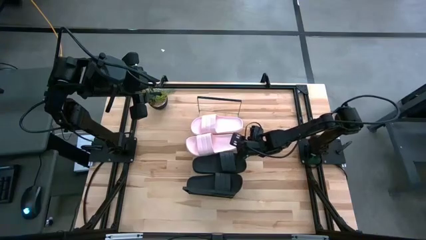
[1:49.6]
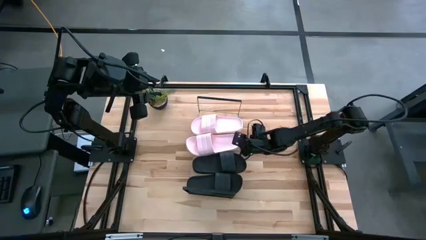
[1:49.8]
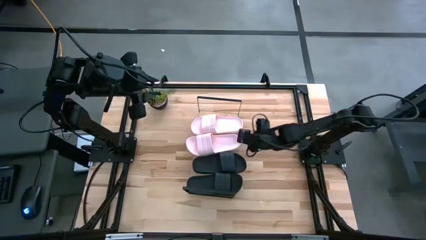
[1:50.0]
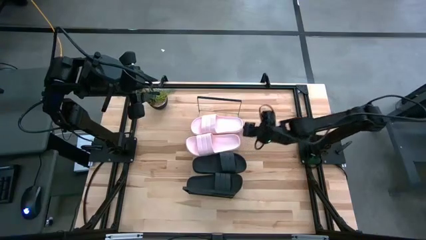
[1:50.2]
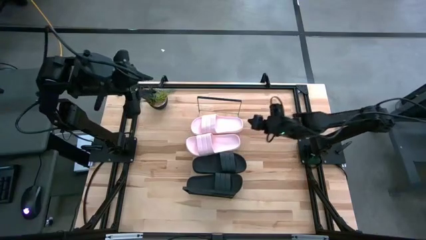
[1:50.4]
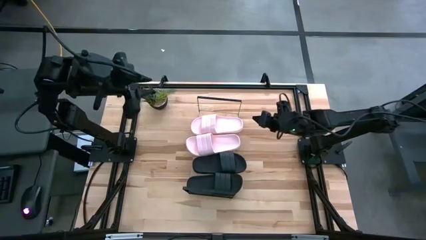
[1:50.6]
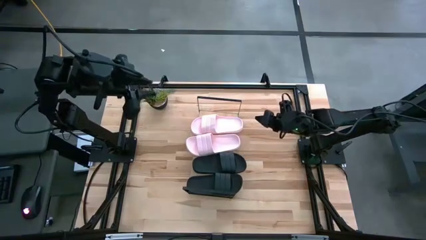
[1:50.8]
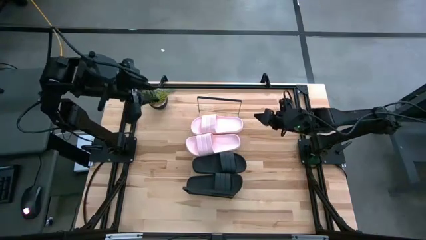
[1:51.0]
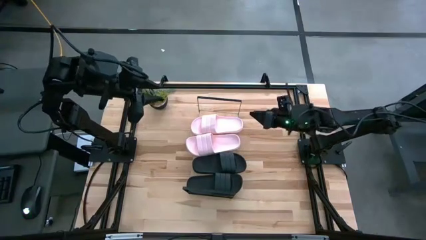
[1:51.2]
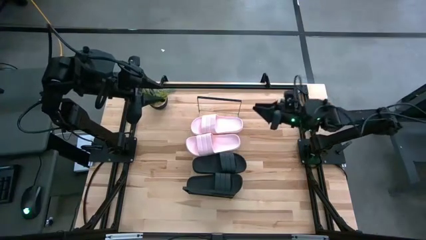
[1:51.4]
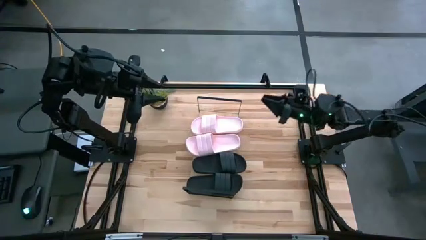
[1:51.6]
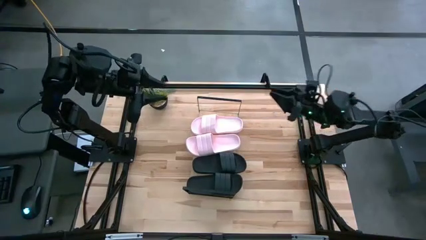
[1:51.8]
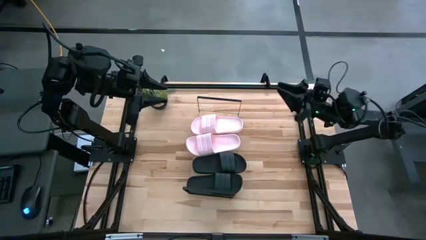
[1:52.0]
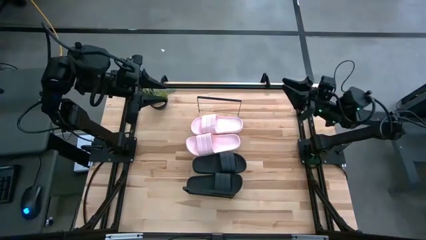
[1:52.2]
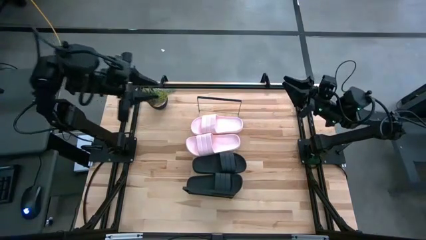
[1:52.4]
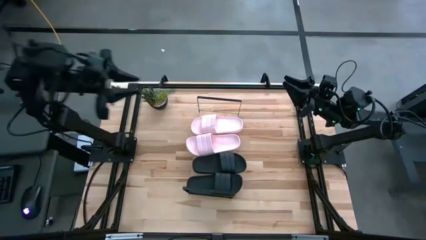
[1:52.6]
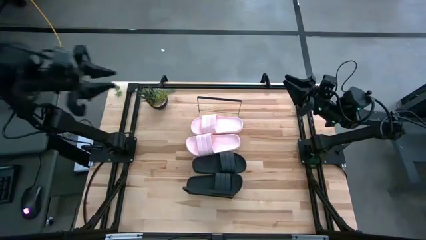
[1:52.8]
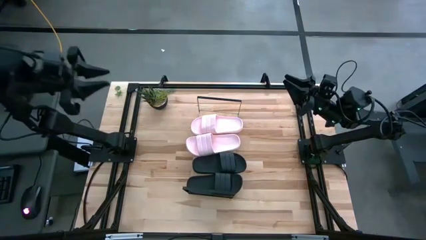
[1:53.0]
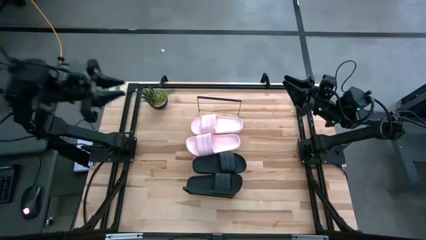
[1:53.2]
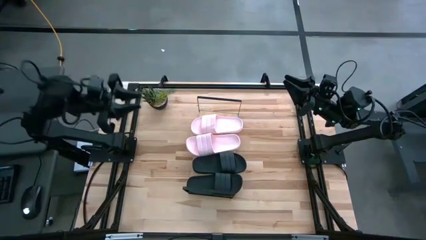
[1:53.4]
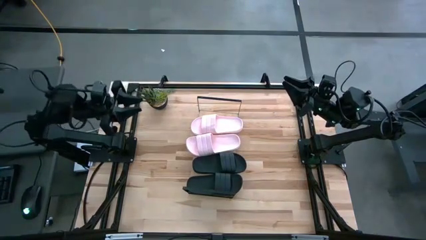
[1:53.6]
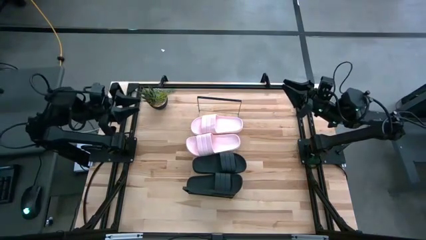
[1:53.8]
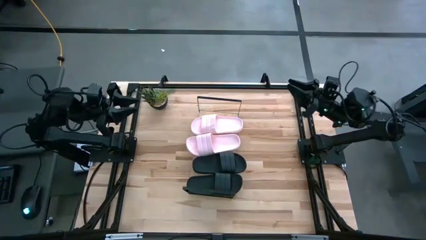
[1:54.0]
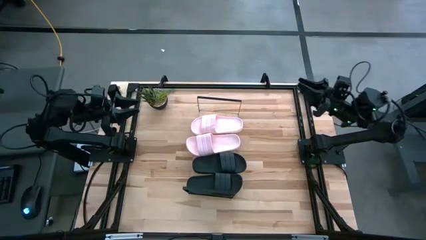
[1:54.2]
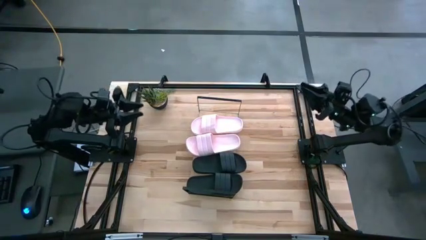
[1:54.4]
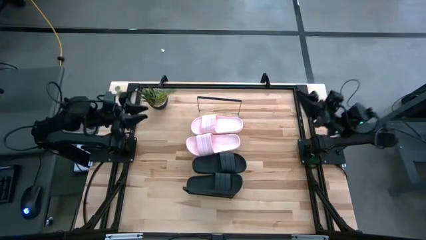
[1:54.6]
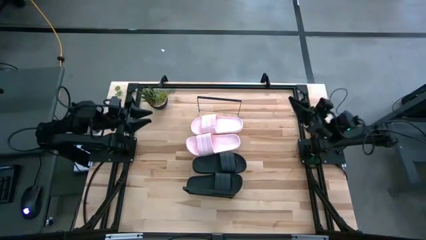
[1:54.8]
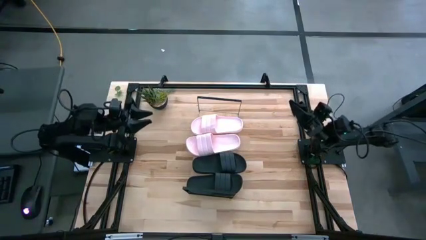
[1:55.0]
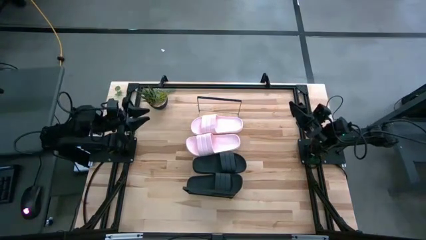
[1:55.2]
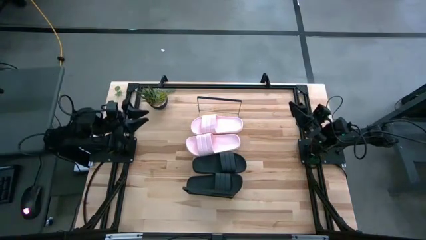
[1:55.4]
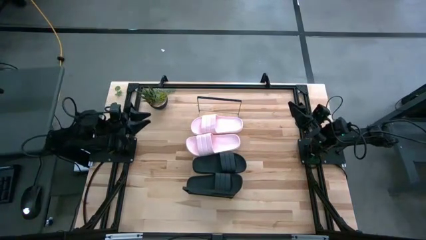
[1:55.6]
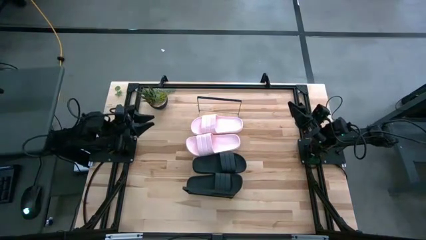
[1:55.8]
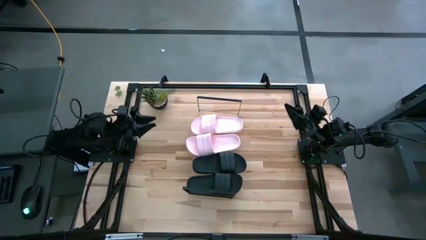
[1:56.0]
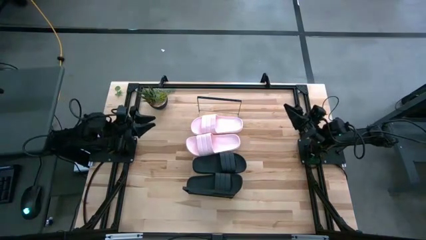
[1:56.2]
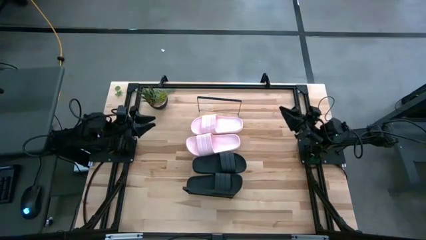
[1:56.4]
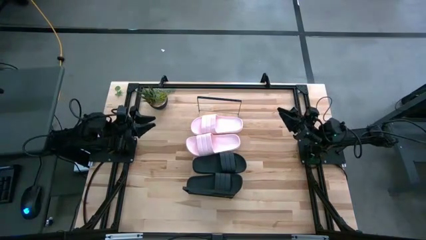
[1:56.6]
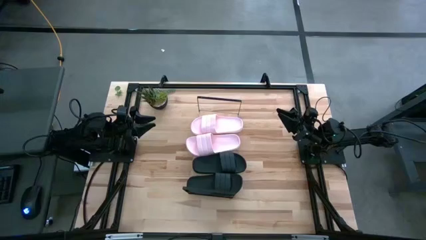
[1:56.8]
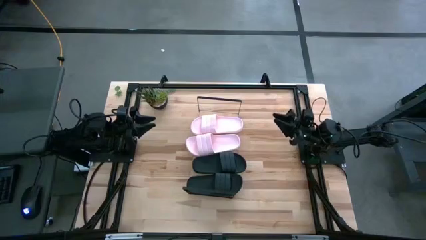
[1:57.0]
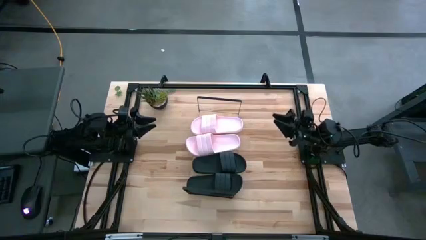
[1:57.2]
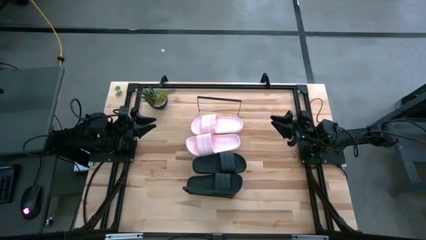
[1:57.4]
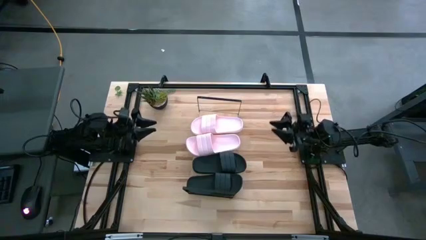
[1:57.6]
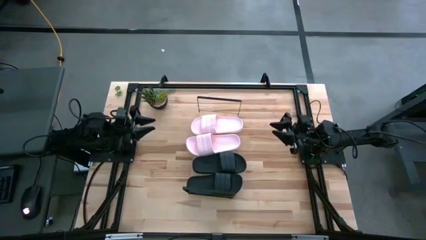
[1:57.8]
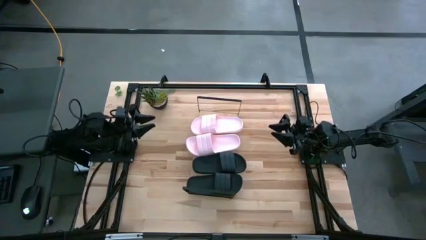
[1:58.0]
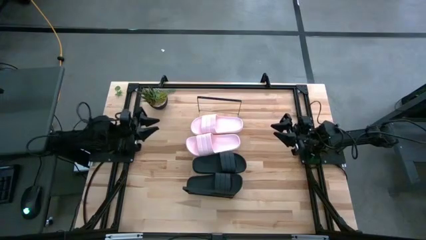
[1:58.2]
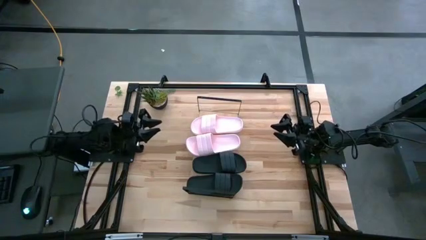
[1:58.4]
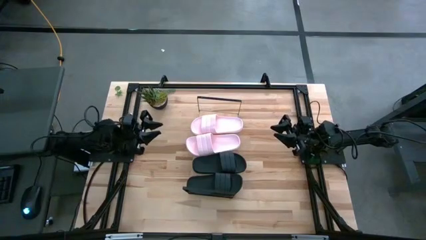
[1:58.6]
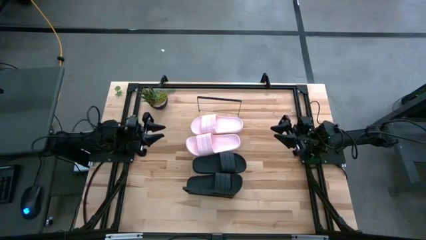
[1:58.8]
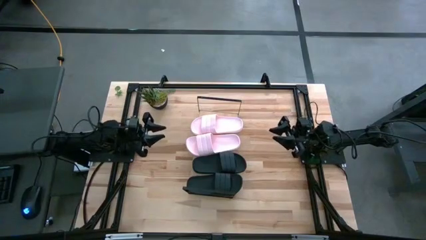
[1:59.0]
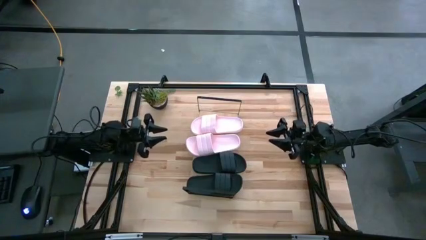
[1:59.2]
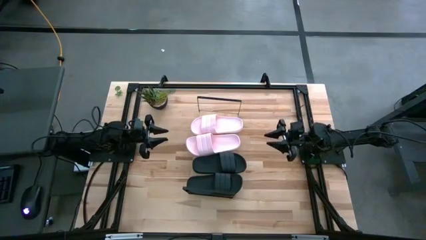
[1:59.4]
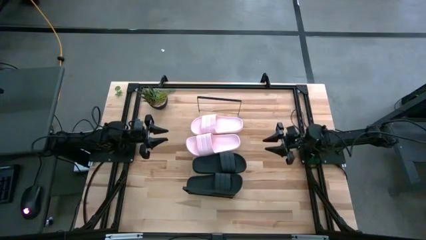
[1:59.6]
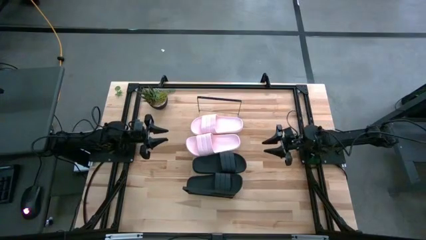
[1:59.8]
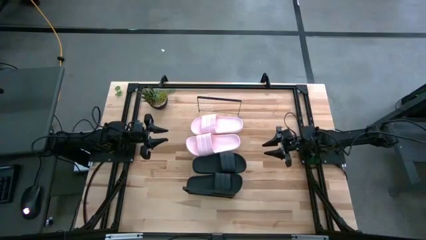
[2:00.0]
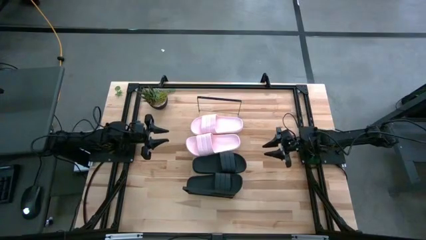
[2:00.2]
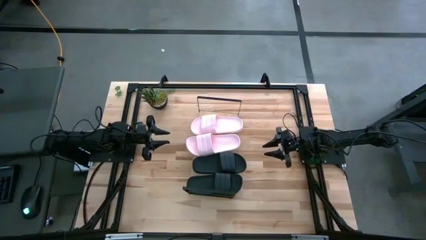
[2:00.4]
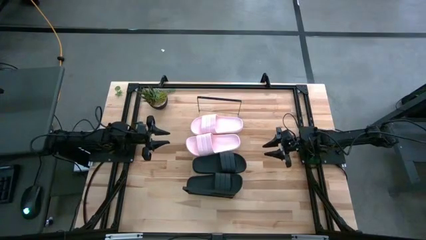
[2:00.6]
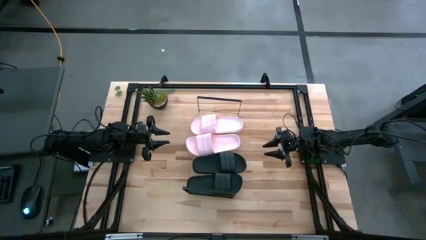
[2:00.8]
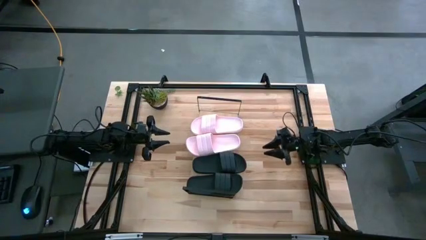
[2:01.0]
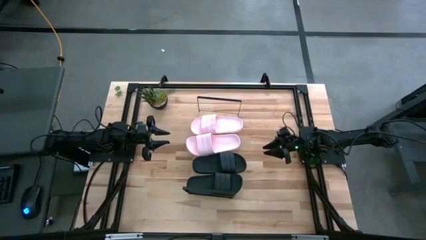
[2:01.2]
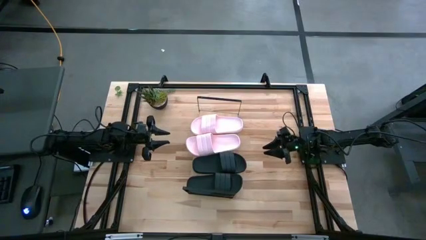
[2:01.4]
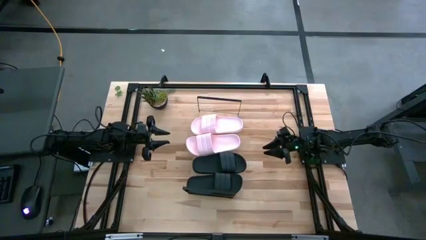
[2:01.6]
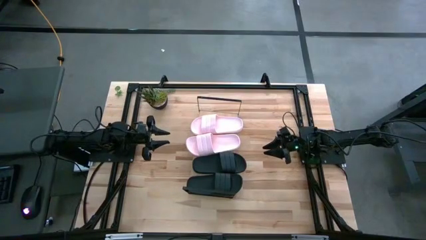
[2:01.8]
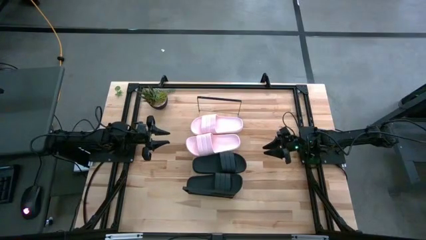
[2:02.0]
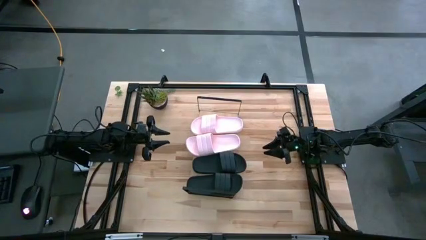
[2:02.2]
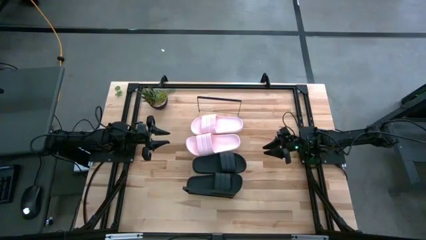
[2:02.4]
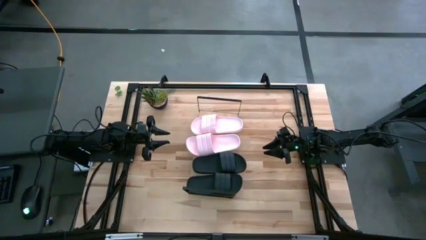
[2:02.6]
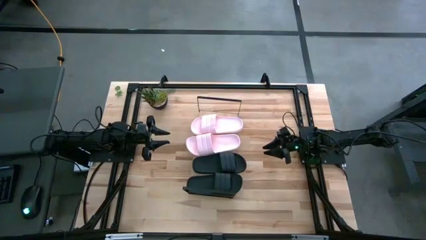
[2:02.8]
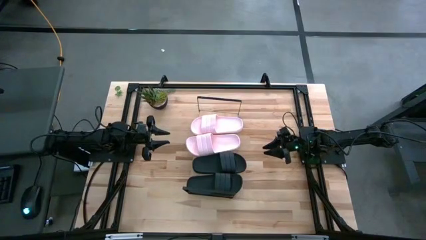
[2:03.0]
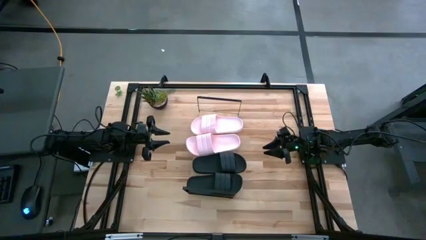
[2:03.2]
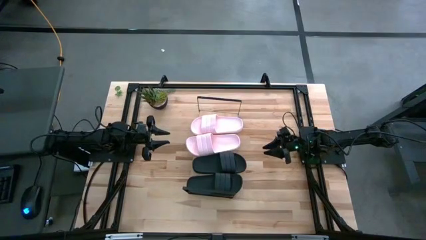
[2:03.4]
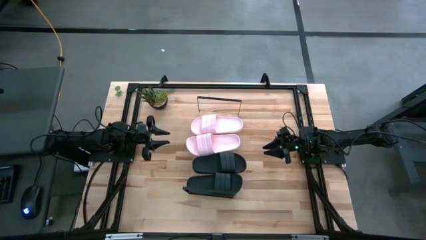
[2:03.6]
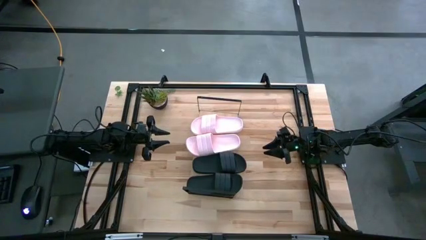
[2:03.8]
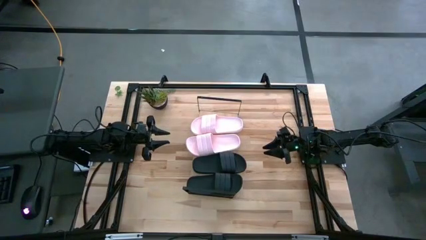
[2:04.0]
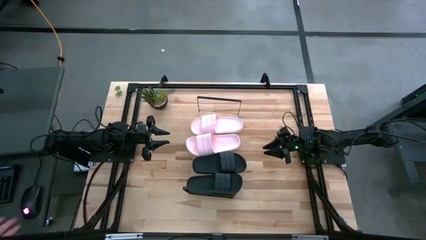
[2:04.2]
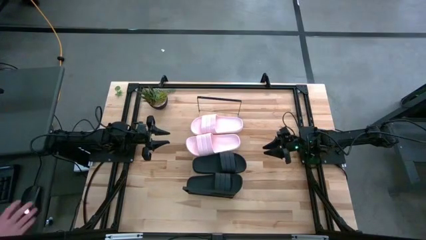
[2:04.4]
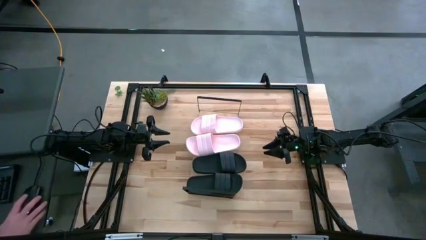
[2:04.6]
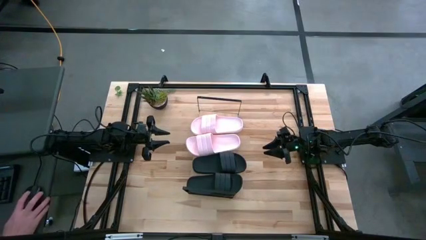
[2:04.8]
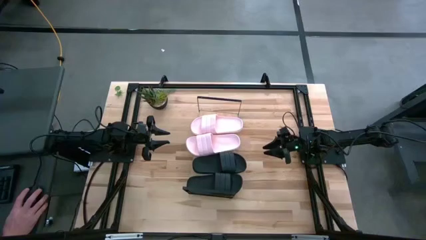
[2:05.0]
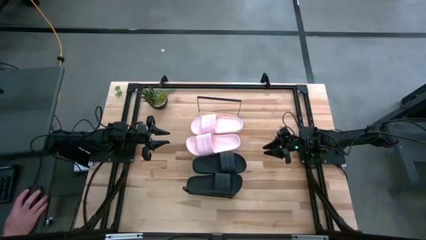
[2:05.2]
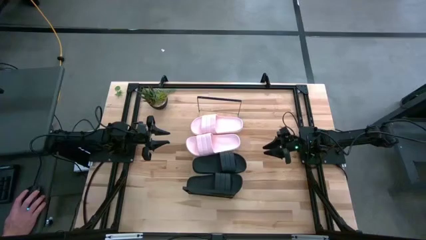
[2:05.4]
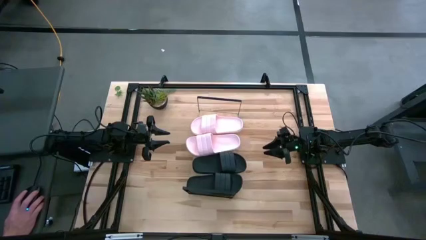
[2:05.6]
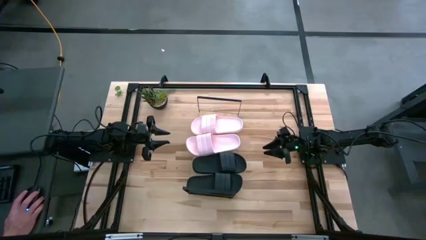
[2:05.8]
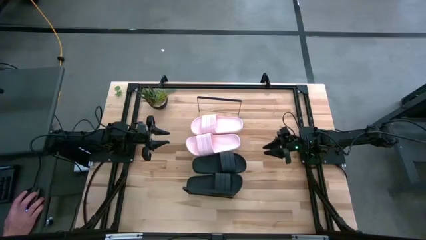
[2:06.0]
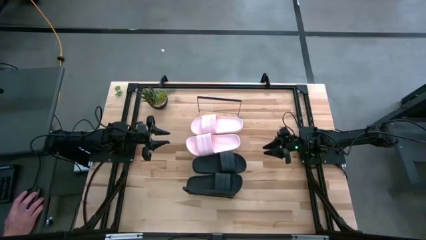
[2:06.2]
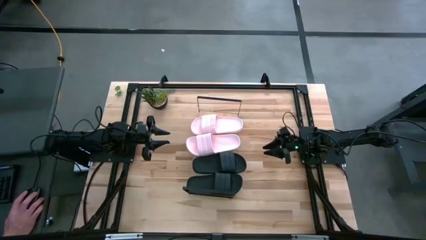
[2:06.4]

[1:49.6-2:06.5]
Task: Pick and place slides into the shelf
Return to Home Position
